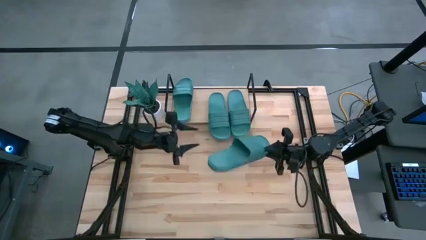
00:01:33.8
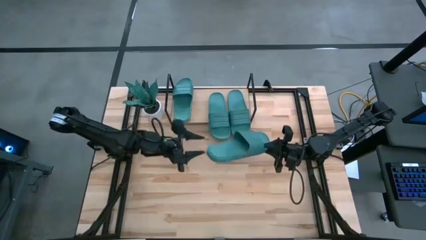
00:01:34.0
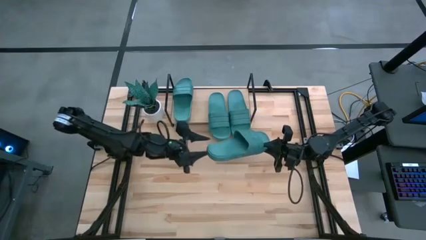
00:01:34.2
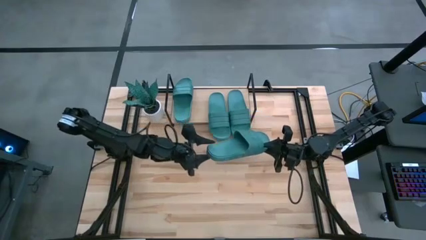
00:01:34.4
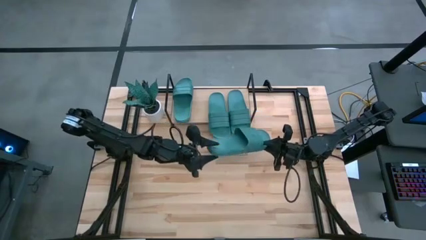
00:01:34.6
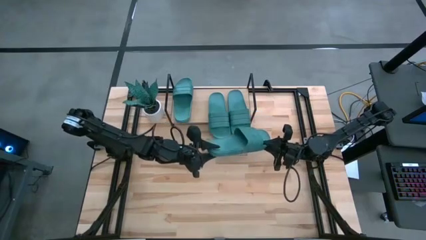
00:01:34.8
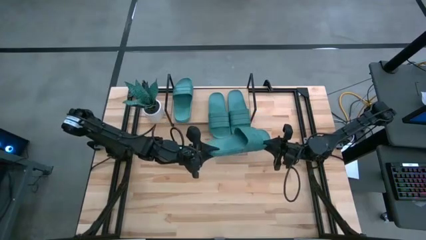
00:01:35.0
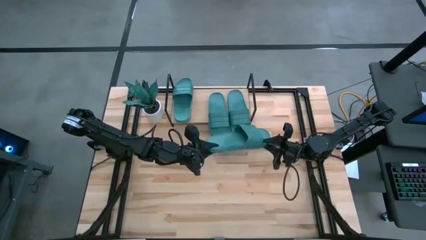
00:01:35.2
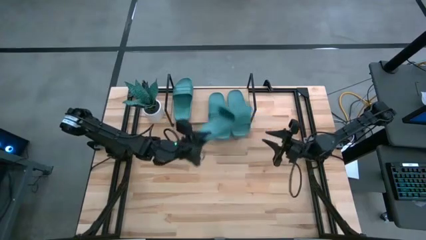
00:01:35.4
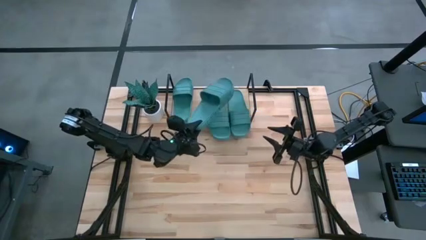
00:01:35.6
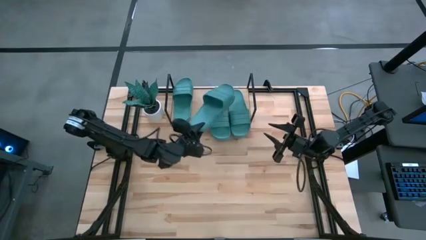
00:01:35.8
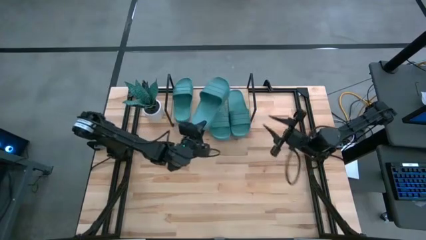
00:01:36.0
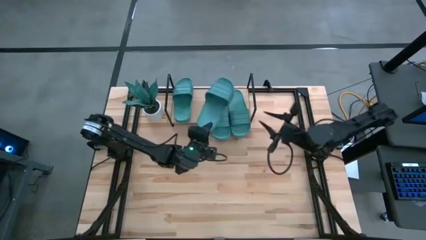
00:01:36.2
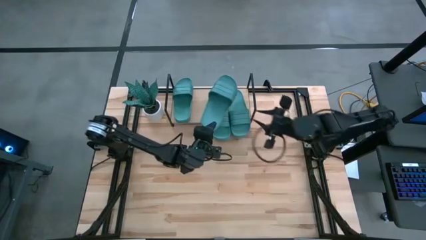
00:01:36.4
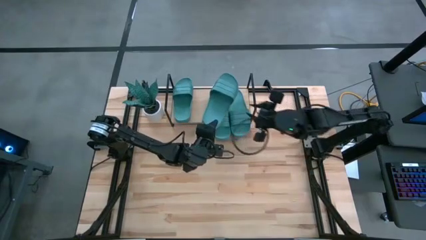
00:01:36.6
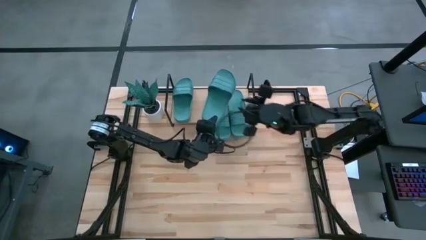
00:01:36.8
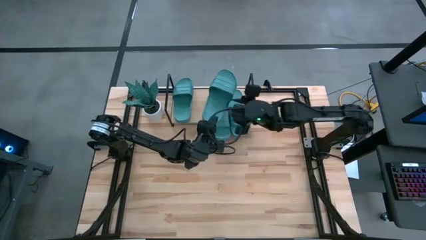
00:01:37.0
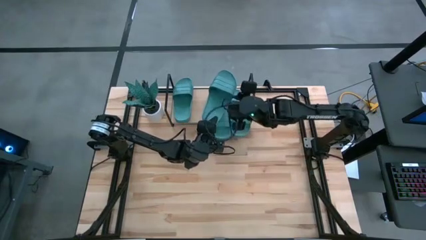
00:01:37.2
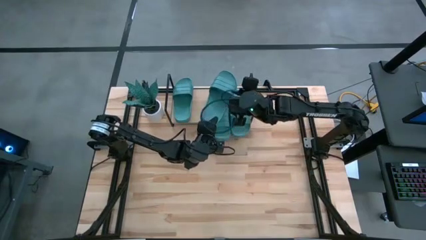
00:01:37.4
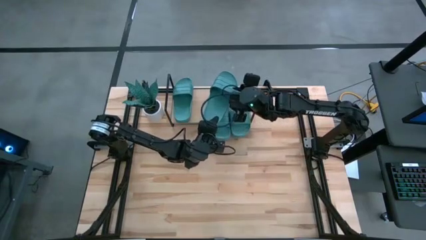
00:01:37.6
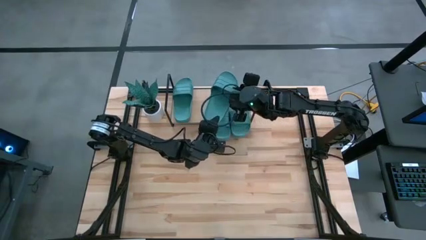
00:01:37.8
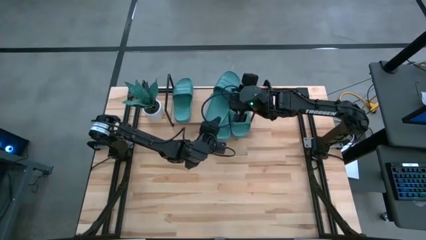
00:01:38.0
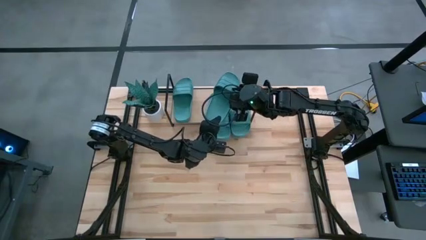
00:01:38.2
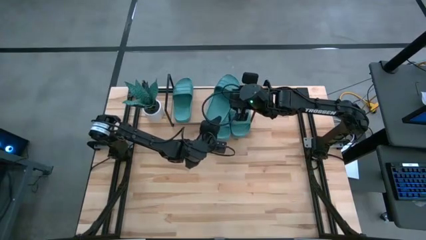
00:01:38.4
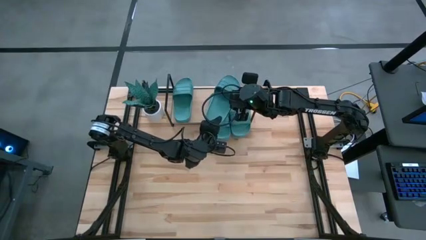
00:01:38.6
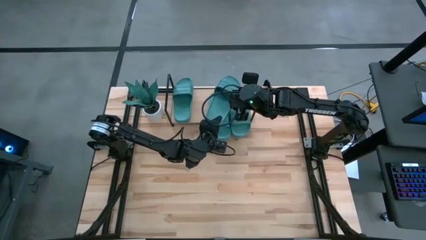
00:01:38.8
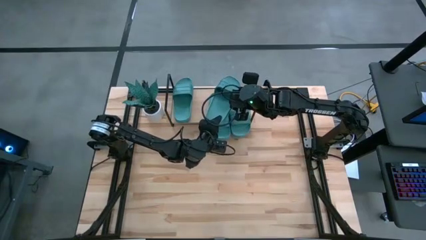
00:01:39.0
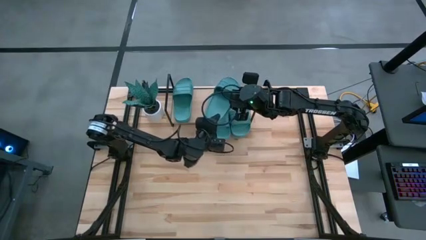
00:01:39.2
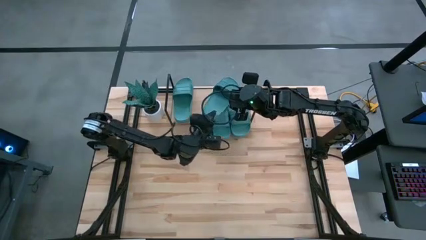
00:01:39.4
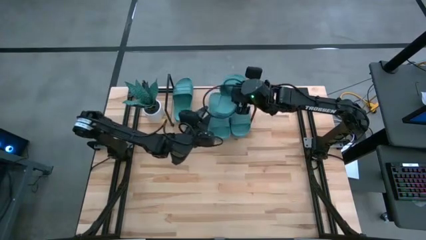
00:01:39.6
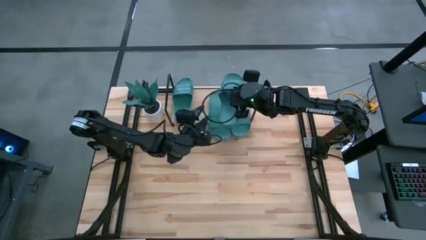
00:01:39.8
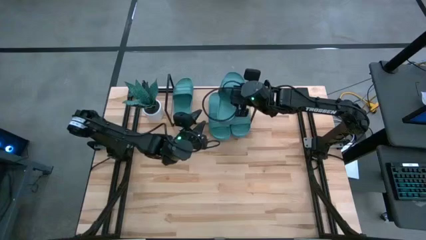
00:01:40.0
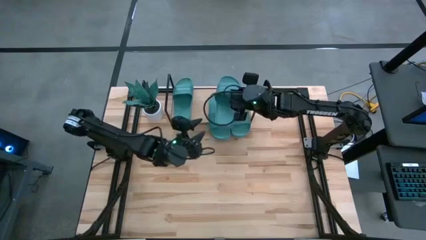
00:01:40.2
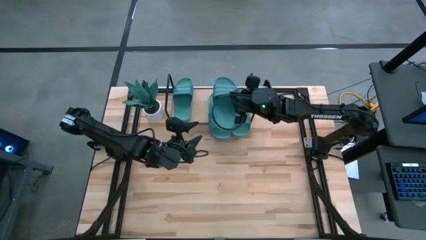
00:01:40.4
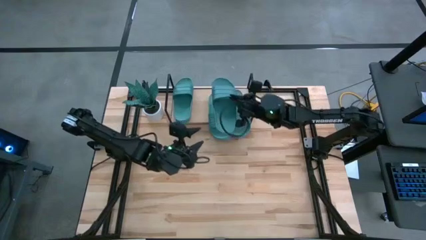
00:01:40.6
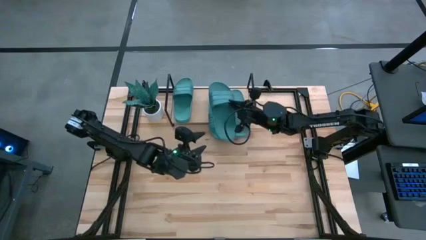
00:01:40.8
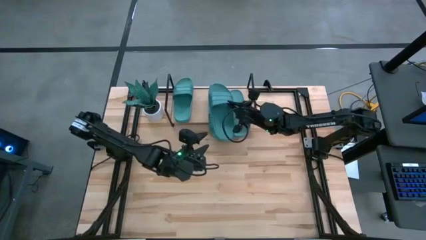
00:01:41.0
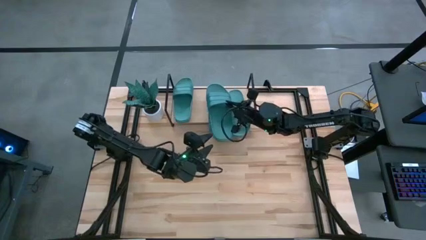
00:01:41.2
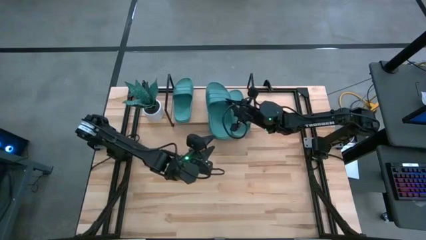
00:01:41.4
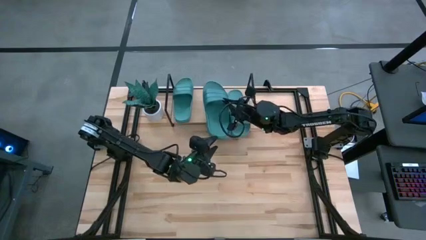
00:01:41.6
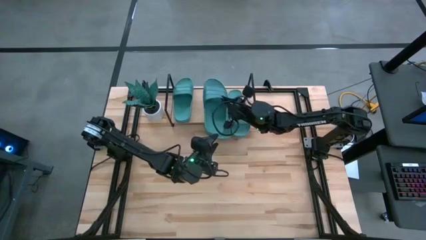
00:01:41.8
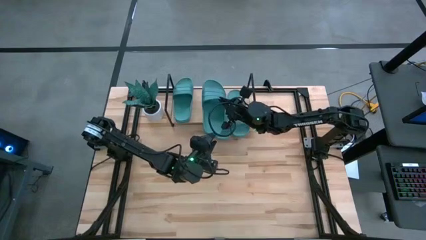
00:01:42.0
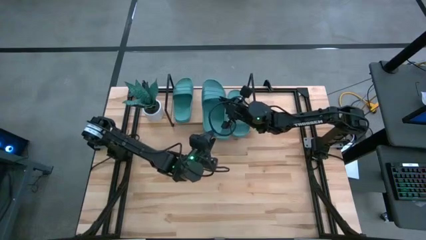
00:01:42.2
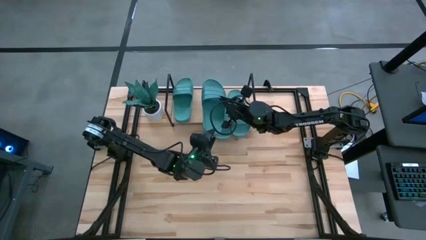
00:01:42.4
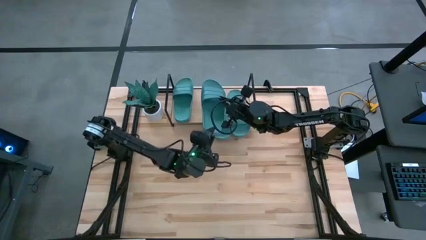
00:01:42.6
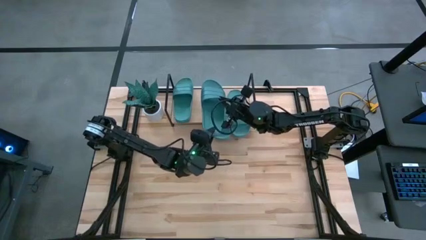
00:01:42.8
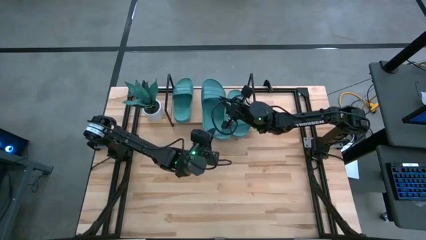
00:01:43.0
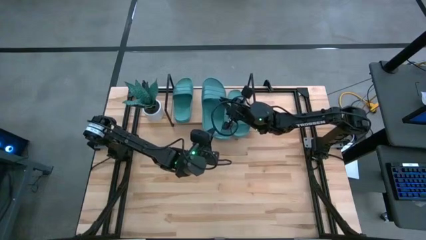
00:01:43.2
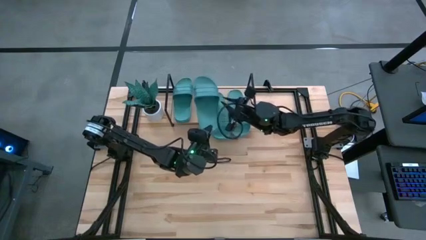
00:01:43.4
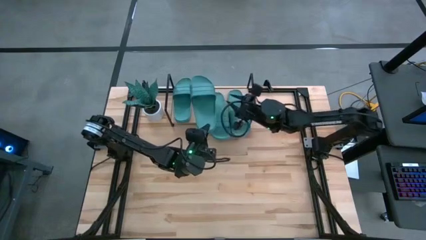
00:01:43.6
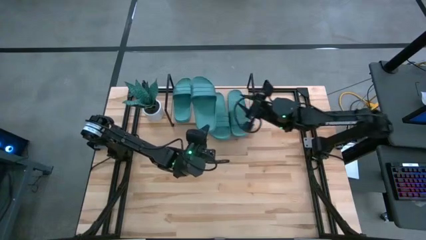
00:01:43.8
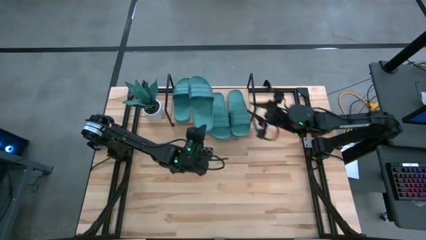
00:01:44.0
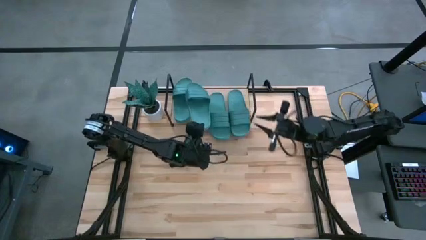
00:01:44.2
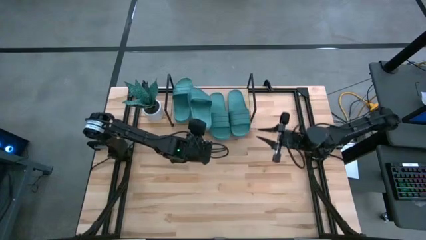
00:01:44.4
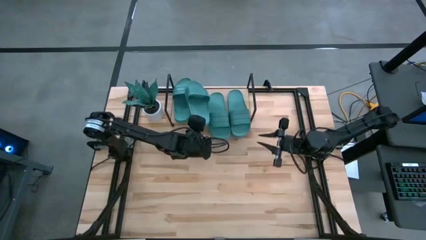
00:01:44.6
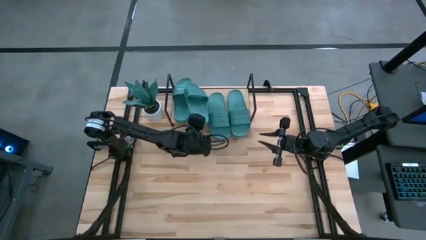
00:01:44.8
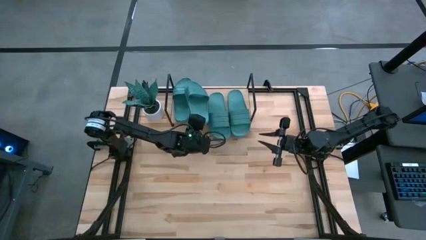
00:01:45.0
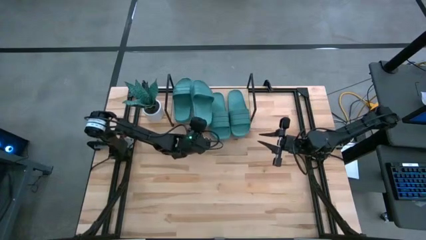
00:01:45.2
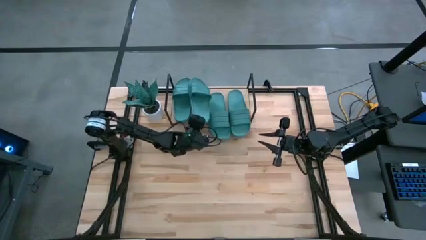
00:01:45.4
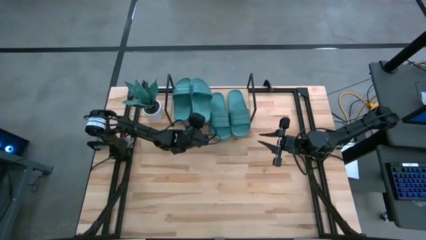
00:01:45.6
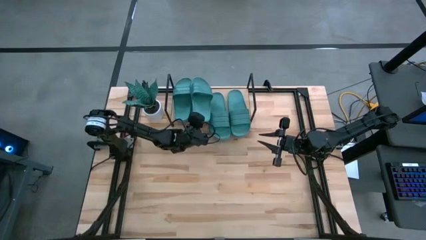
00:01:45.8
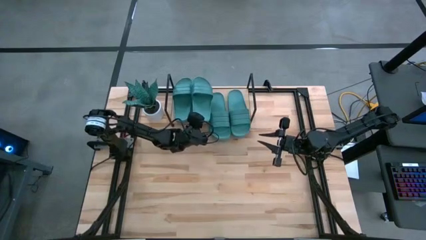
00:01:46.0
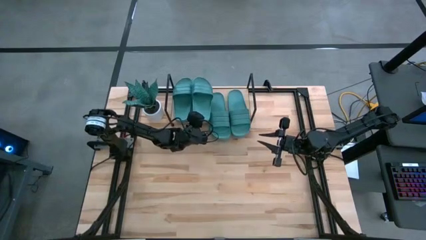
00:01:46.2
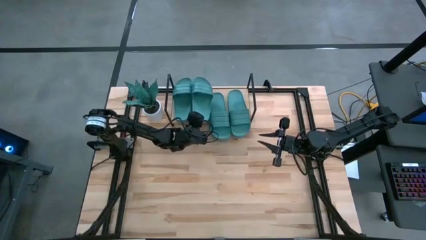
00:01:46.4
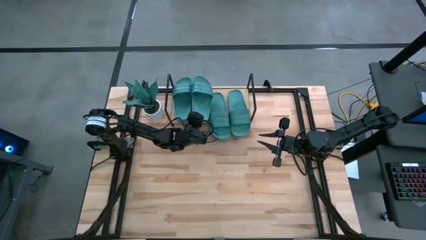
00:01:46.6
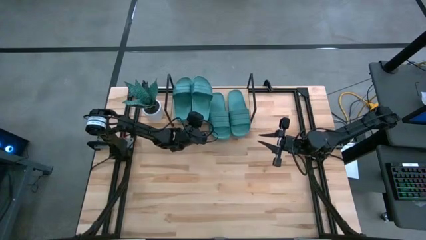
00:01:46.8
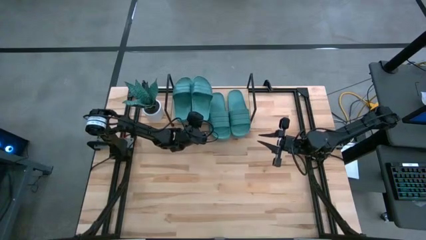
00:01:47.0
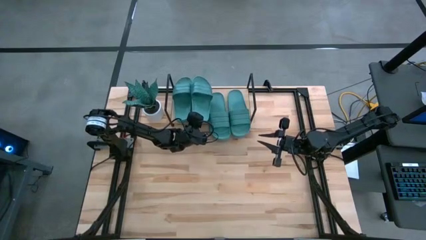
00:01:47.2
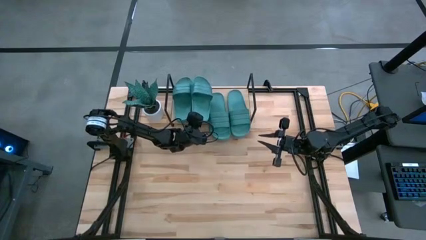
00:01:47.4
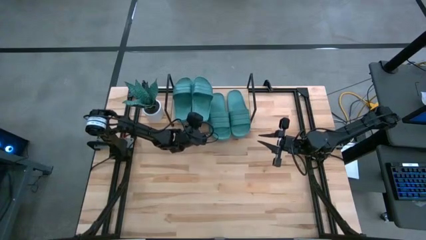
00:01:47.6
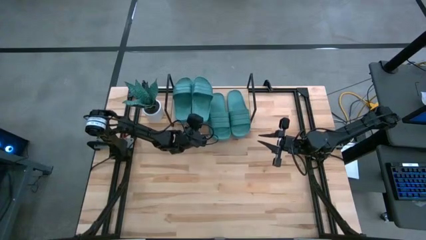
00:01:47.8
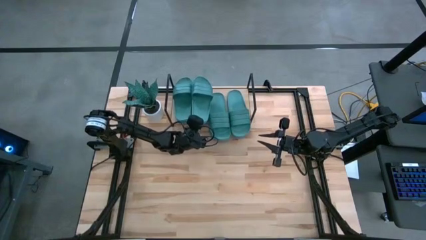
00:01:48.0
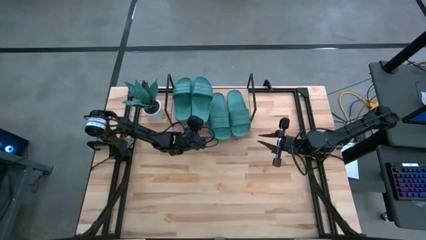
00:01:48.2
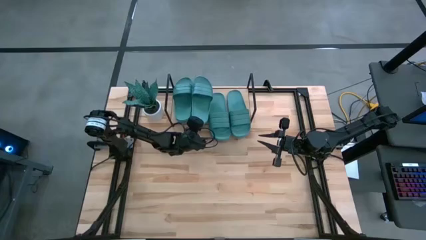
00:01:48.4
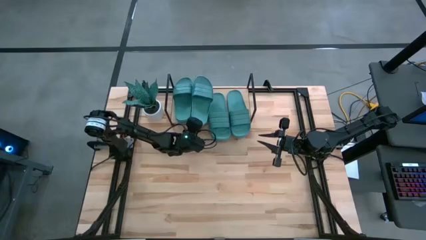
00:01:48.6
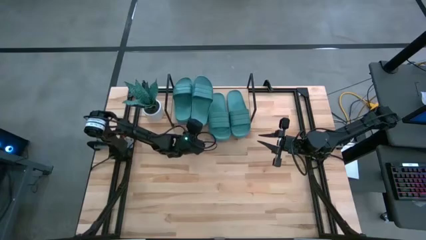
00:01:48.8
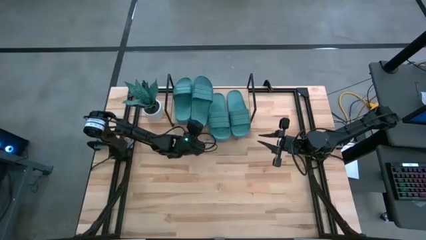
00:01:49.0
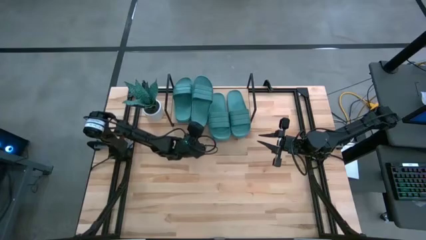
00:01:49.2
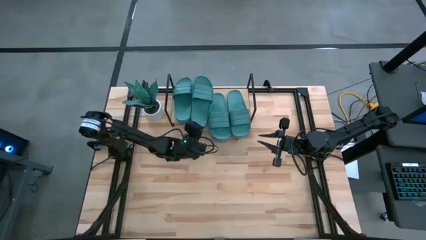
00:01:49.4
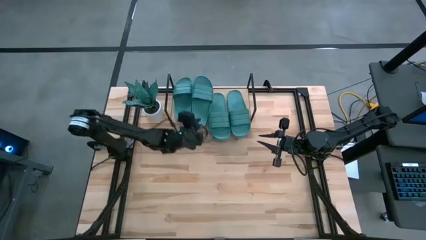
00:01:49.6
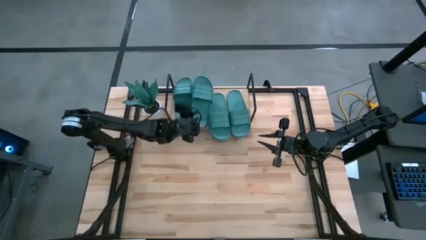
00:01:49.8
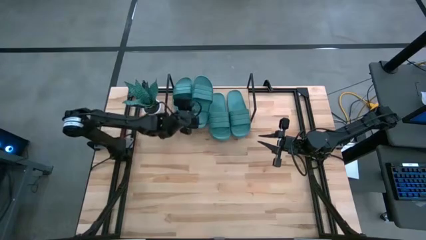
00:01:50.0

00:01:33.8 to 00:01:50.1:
Task: Pick and place slides into the shelf
Put the green slipper on the shelf
